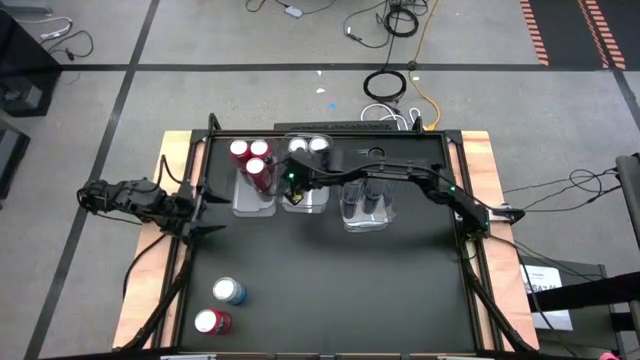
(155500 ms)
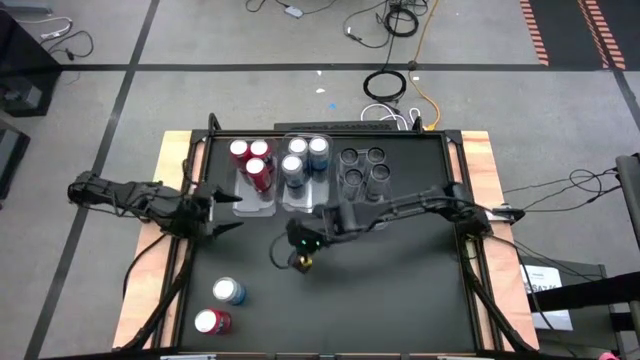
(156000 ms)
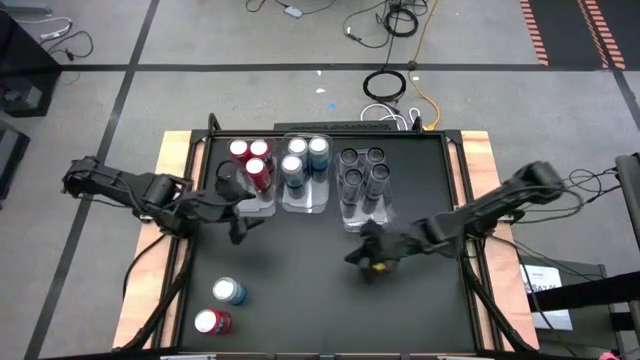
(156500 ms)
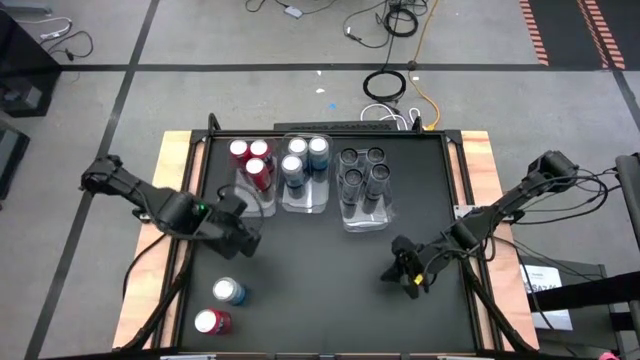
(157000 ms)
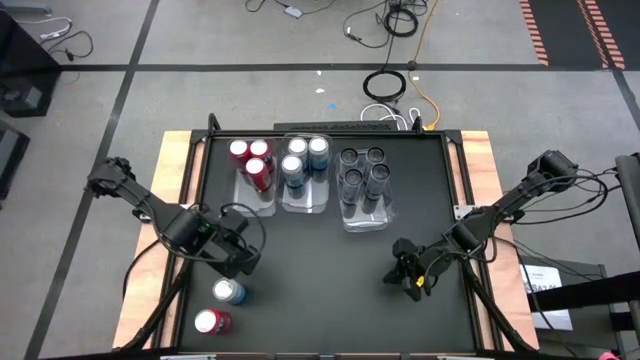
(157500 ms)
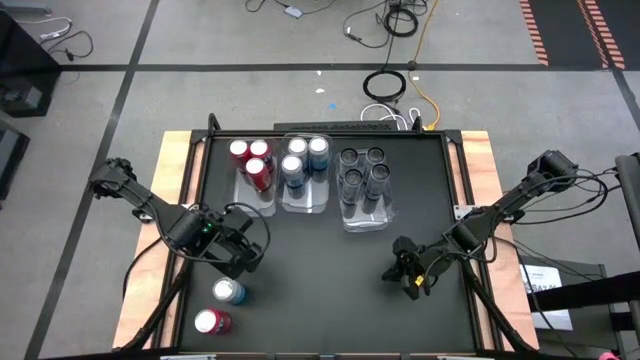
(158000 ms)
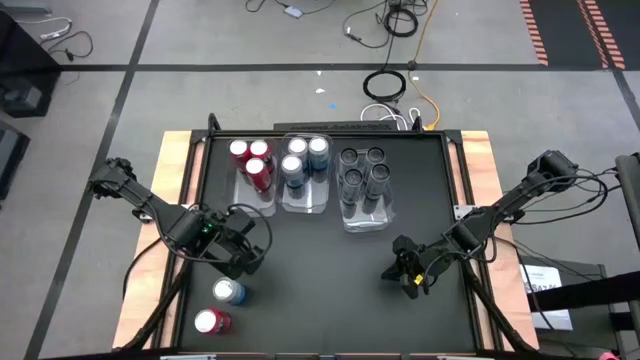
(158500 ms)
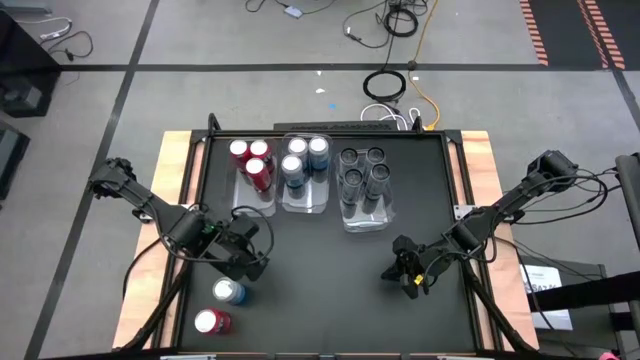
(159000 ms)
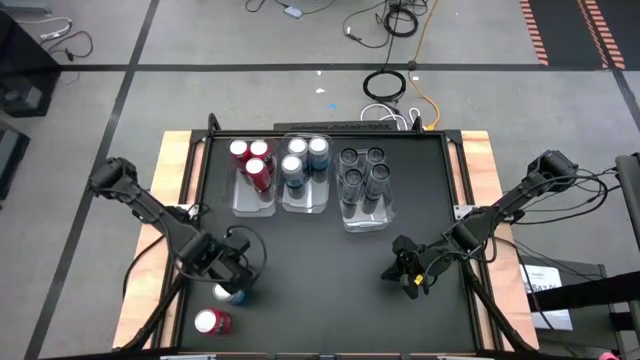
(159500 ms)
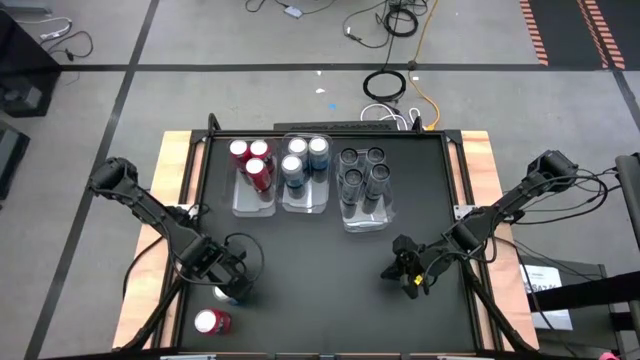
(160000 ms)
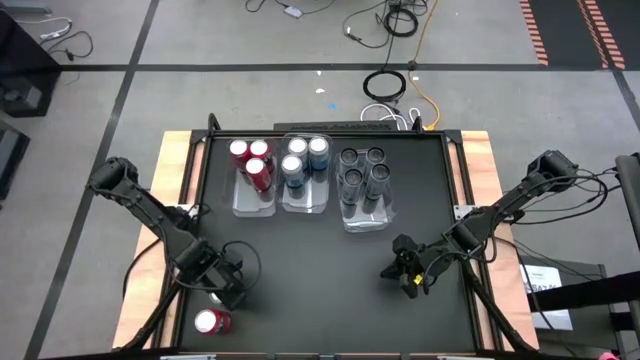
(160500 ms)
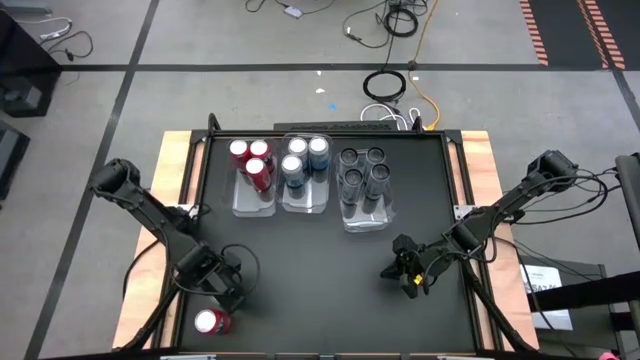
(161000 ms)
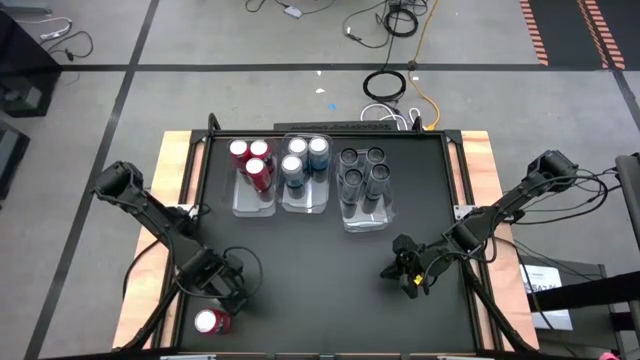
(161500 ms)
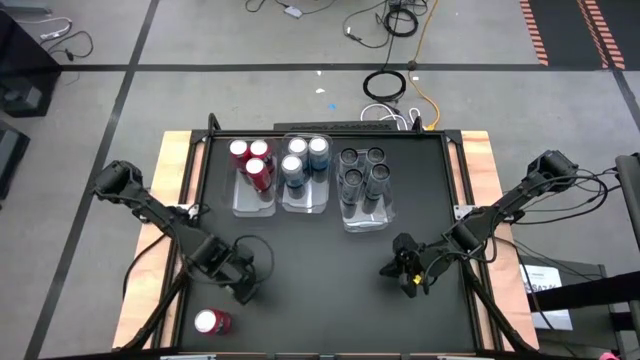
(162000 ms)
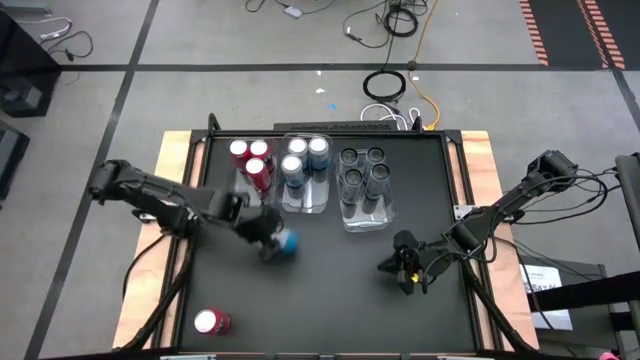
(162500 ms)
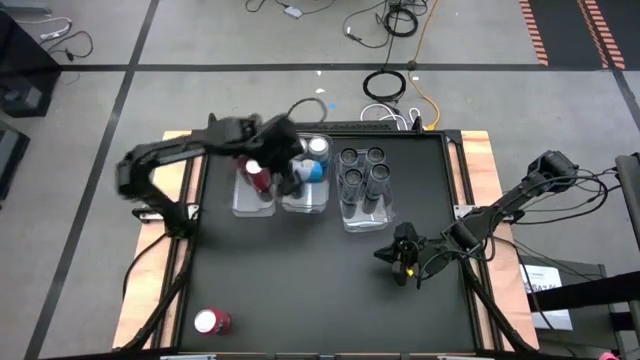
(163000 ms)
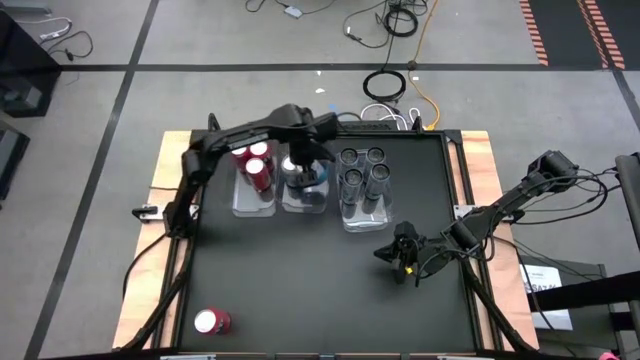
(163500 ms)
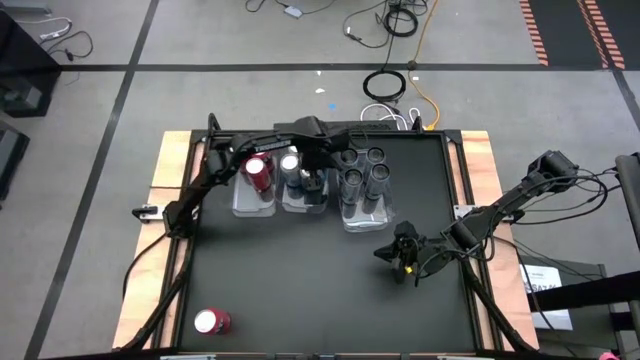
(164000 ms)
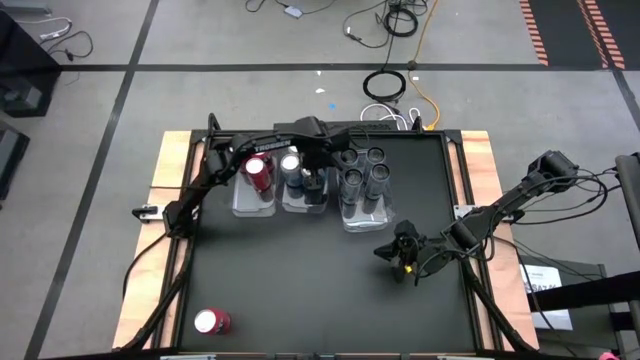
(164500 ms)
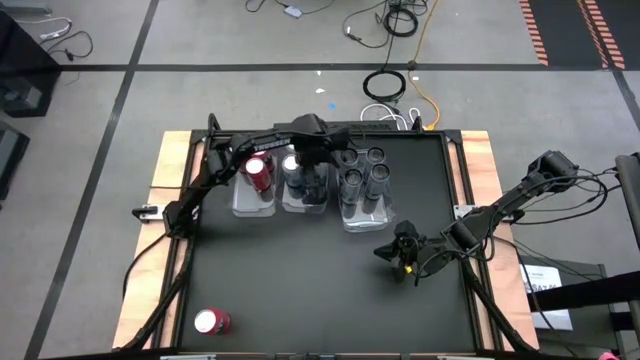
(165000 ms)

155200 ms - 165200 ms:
Task: Sort soda cans
Put the blue and white soda can into the middle transparent bin

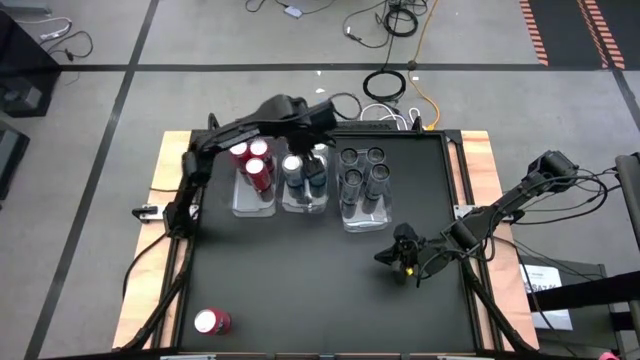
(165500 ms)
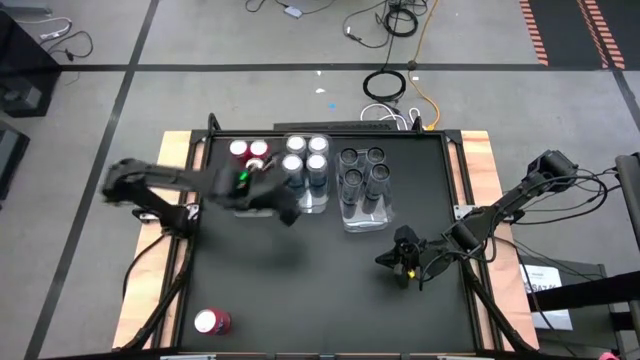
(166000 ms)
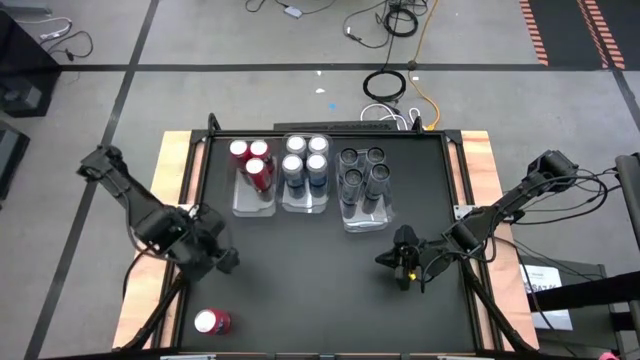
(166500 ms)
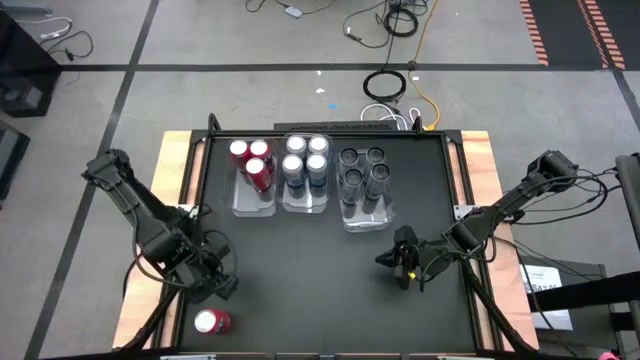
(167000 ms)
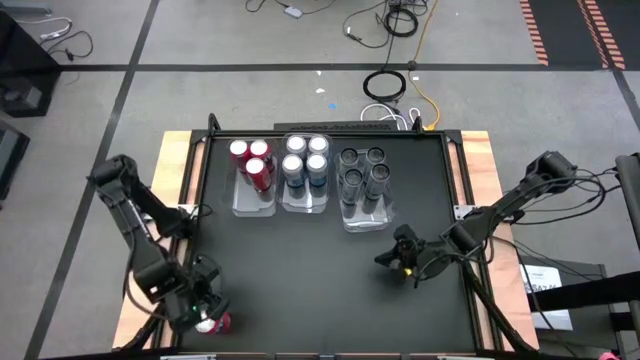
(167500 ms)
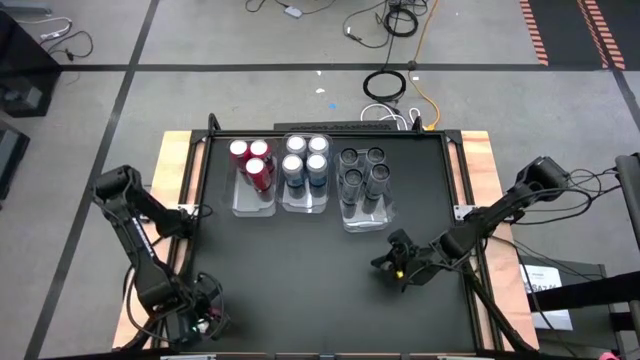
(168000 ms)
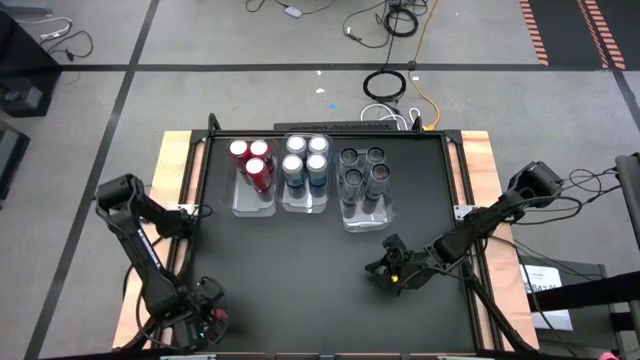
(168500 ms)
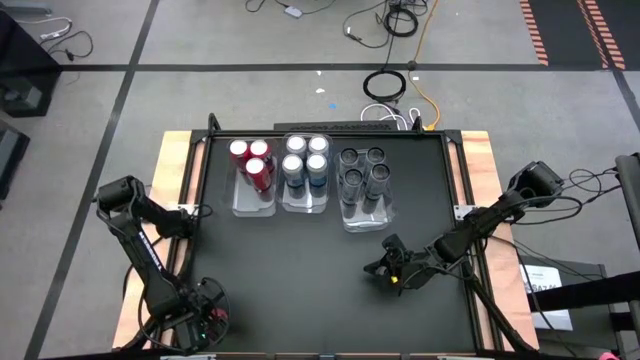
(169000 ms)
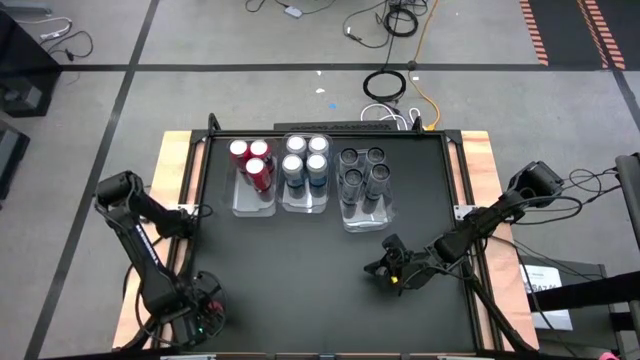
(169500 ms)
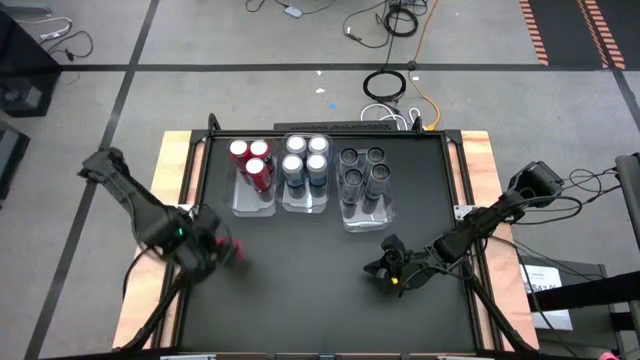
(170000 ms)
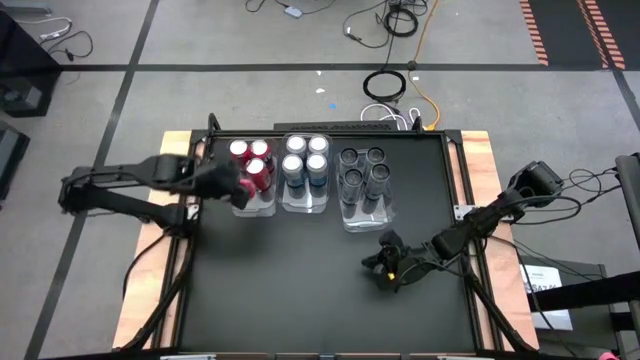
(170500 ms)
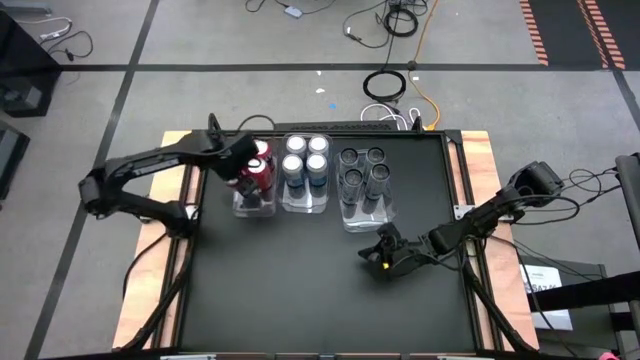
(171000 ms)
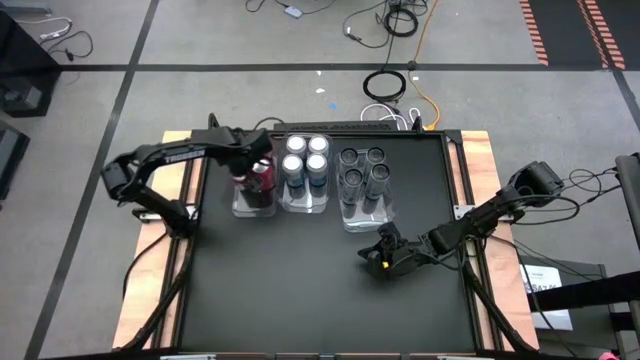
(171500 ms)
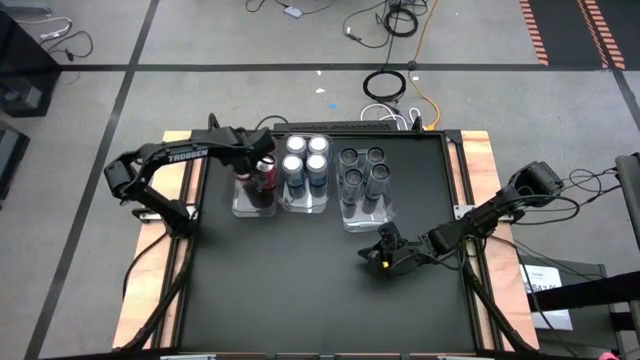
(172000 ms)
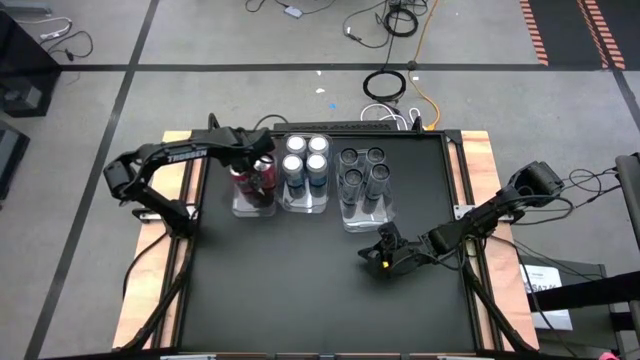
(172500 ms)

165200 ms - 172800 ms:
Put the orange soda can into the left transparent bin

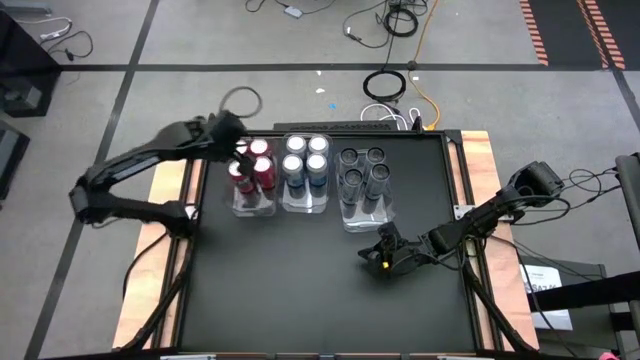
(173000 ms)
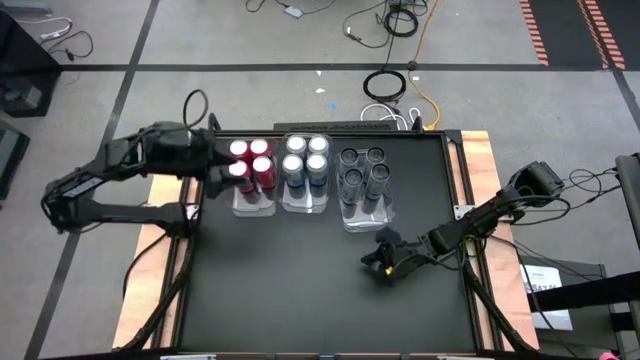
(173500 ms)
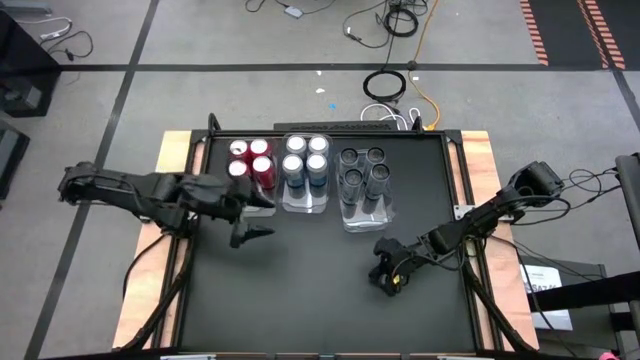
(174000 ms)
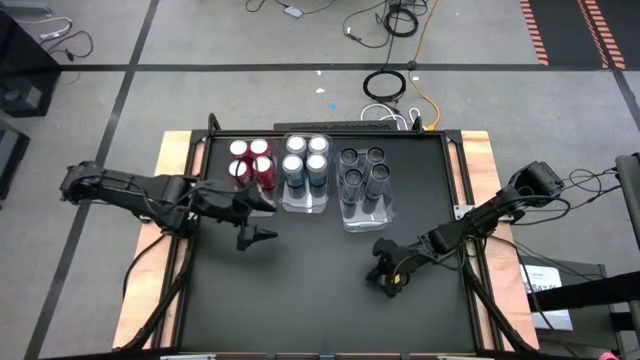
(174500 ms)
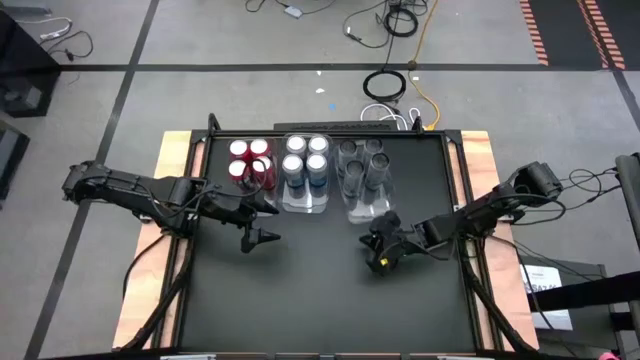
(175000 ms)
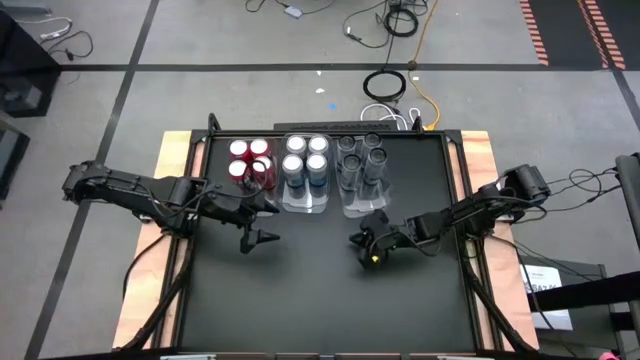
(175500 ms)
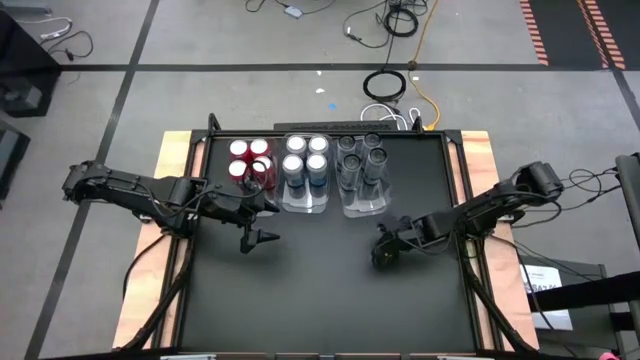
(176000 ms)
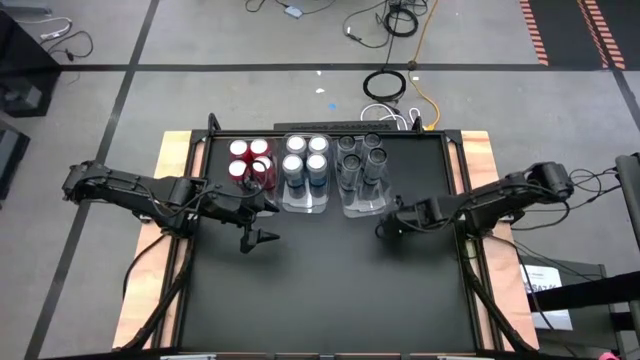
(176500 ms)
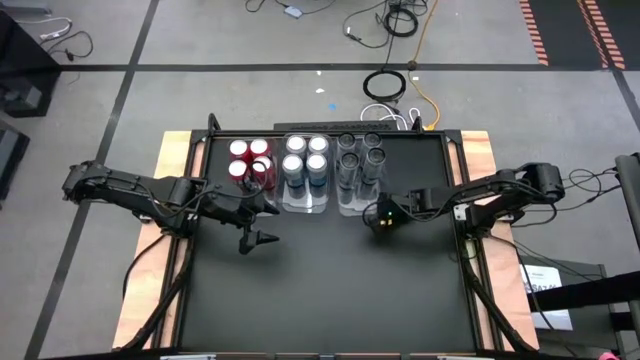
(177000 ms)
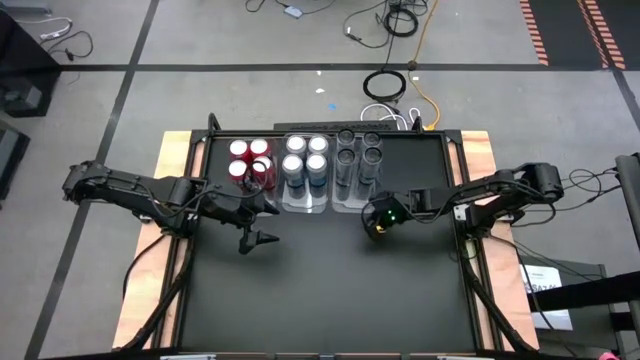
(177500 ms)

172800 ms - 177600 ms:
Adjust the right transparent bin
